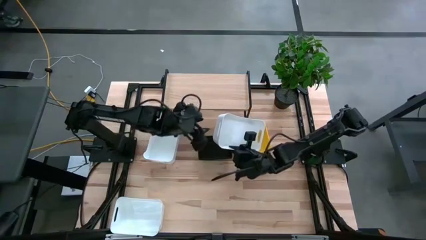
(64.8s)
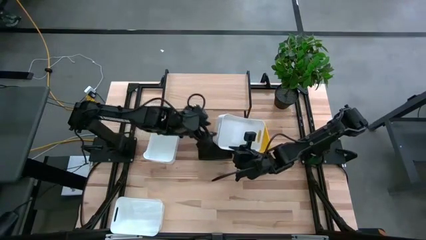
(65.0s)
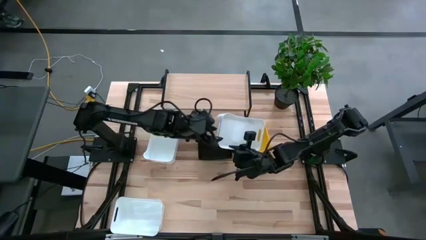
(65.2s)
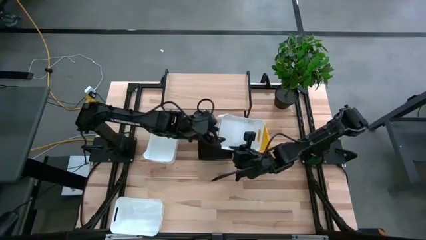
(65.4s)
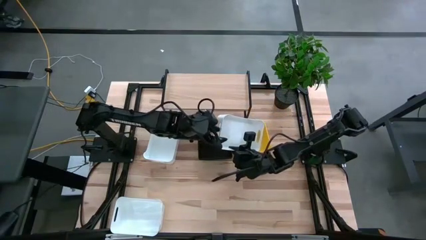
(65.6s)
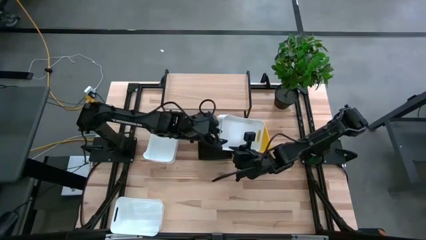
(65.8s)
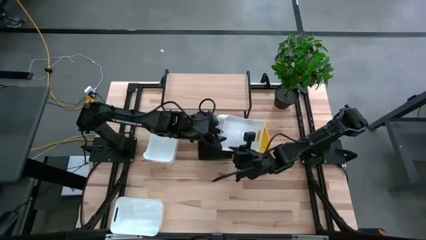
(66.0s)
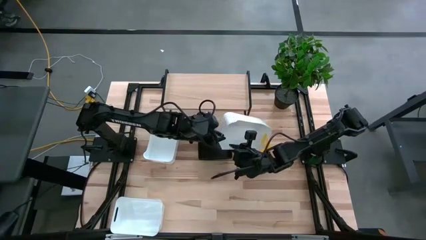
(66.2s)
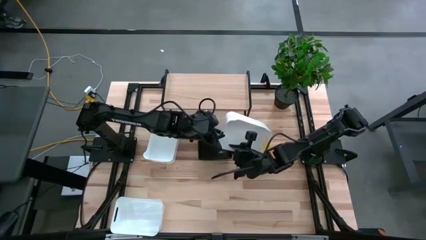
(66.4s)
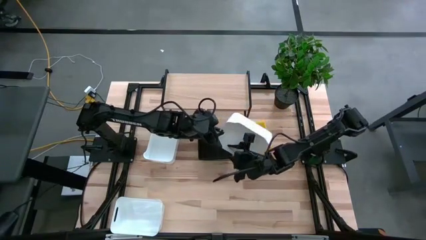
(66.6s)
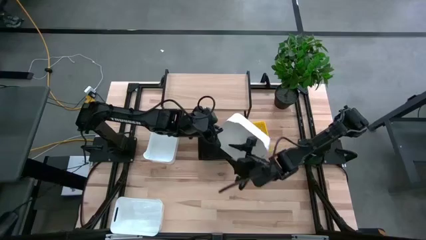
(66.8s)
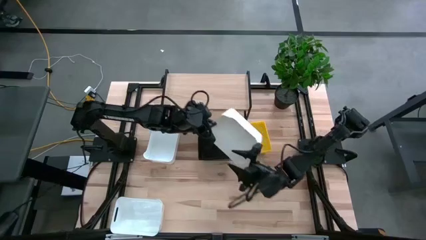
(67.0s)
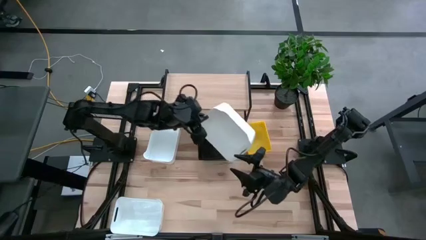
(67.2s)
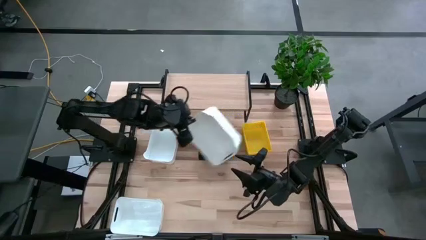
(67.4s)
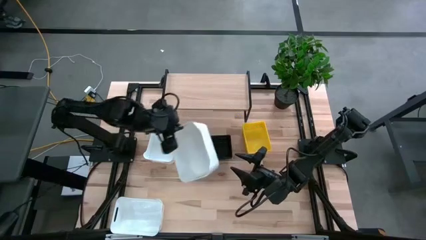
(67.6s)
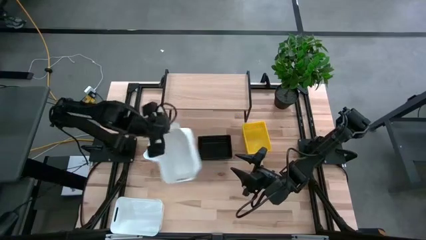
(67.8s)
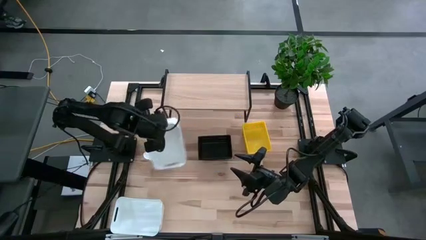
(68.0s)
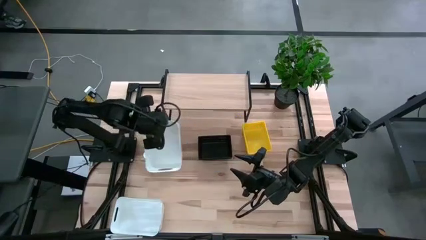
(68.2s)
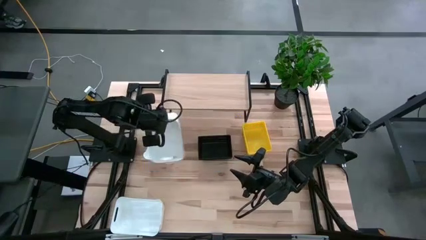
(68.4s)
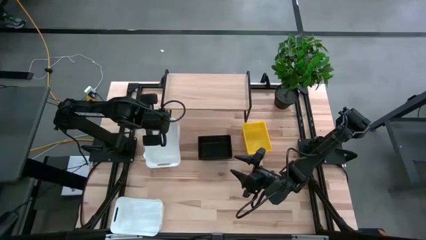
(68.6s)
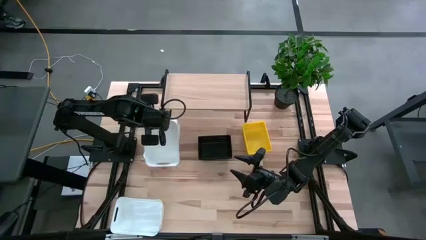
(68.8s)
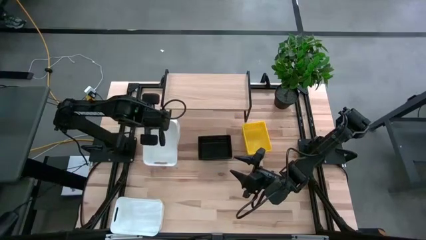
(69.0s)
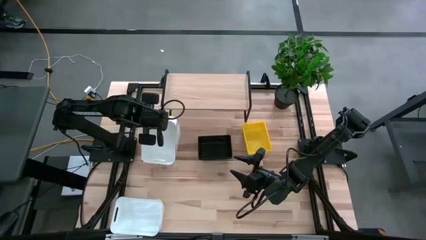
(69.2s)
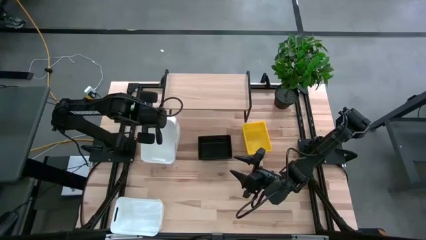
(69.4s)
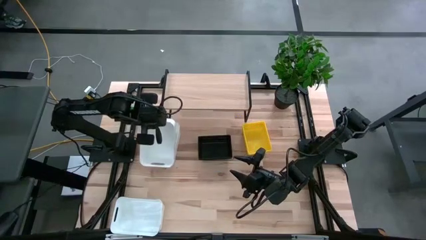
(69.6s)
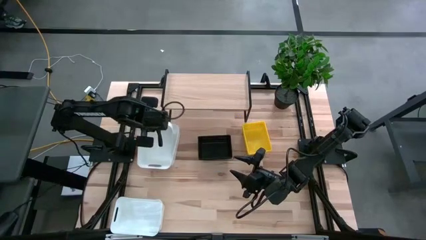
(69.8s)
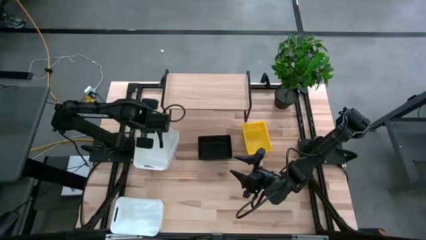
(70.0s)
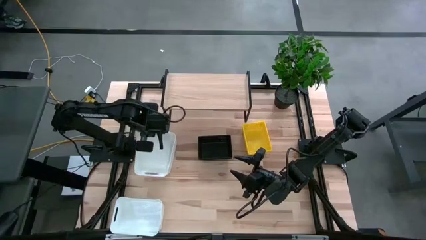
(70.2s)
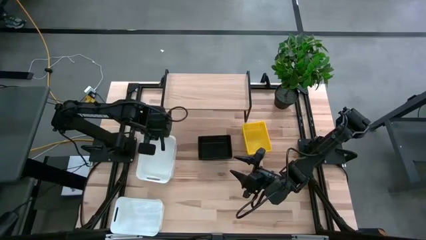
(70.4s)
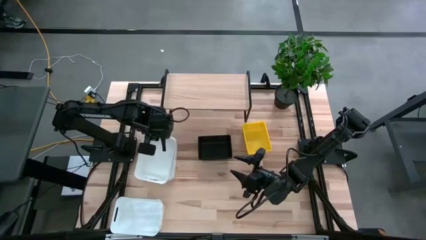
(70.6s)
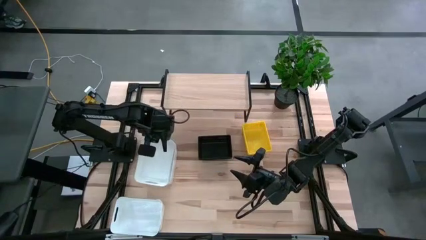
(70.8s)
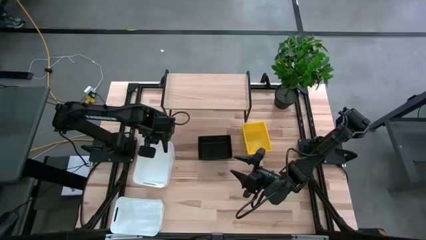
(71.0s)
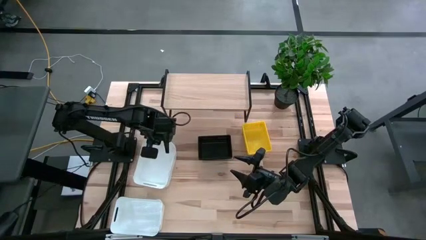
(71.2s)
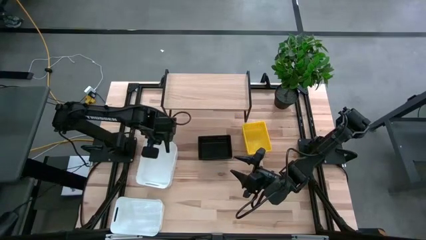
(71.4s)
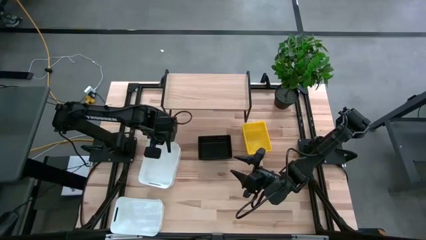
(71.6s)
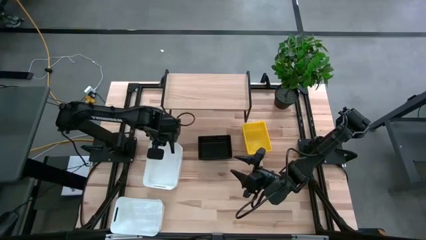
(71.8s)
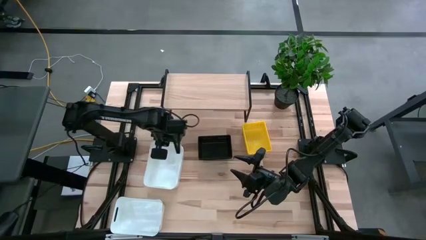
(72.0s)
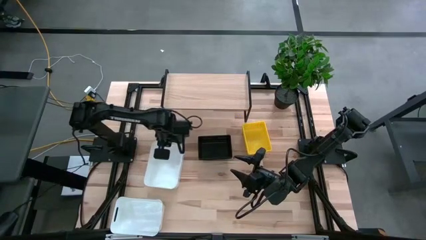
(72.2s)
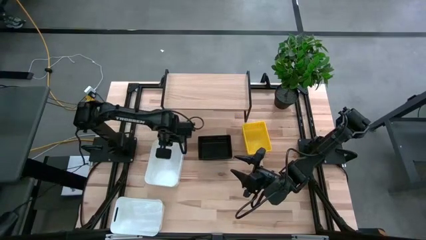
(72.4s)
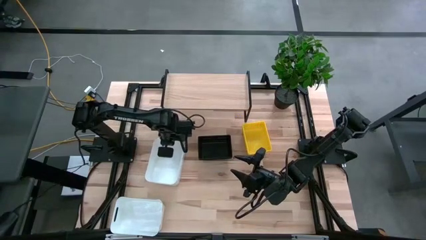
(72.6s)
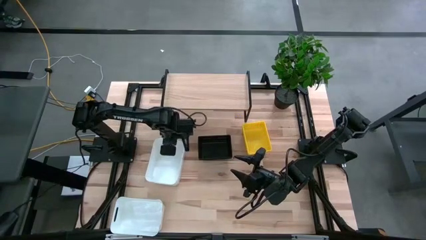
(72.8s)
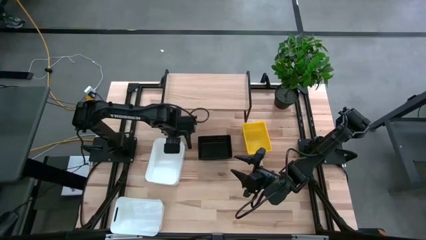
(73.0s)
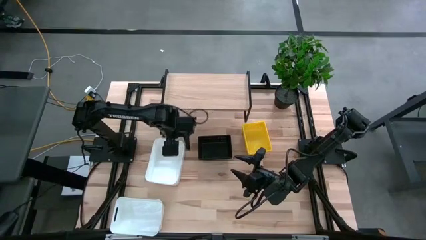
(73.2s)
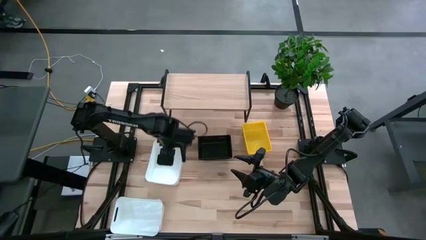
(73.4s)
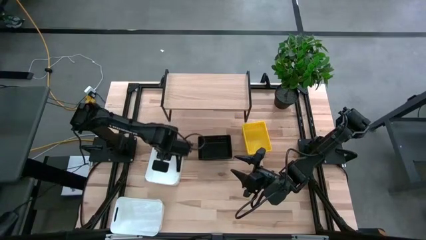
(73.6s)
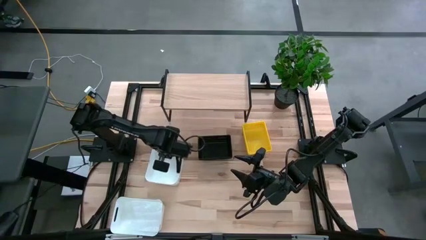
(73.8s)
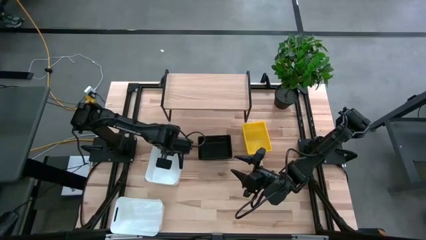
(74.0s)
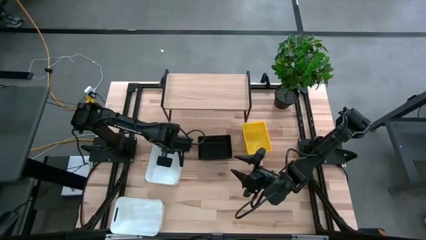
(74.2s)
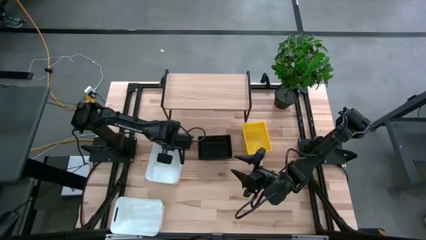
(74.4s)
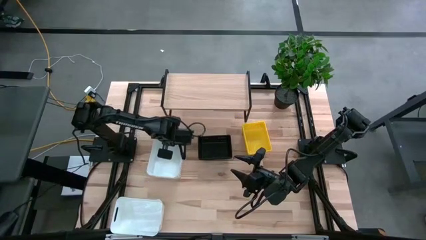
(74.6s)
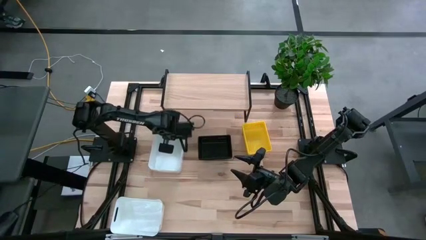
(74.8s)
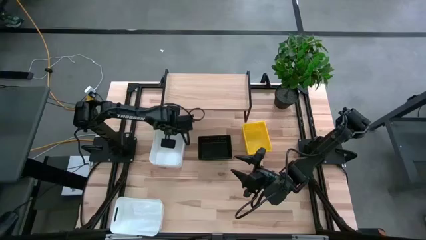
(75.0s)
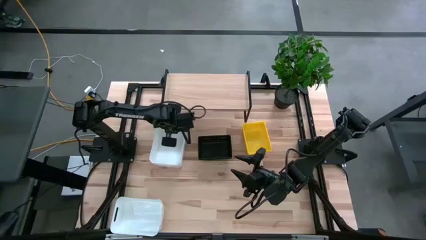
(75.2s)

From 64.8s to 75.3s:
Task: Stack baskets on shelf by color
Stack the top right white bin on the top left white bin

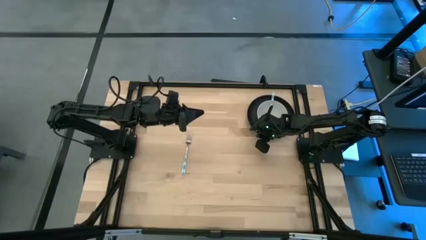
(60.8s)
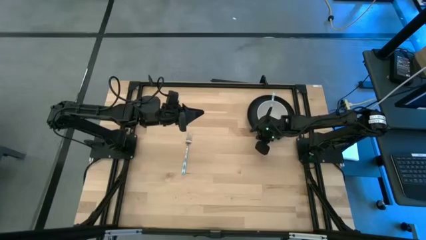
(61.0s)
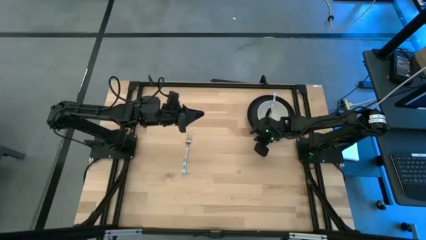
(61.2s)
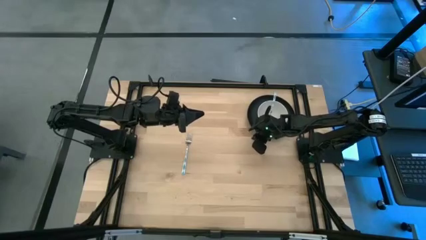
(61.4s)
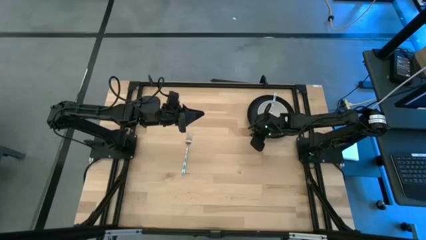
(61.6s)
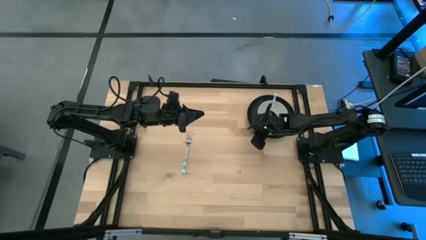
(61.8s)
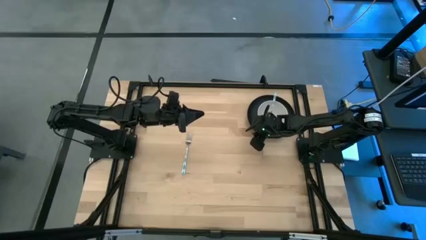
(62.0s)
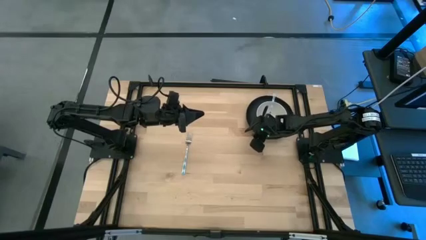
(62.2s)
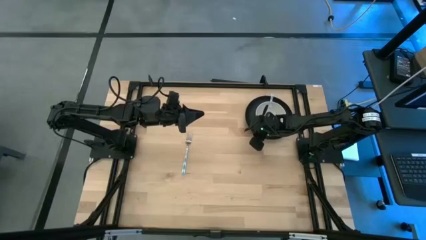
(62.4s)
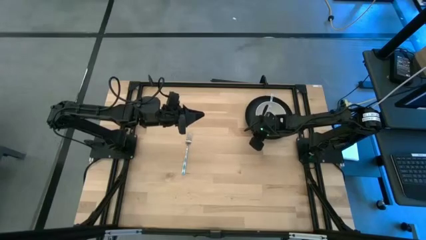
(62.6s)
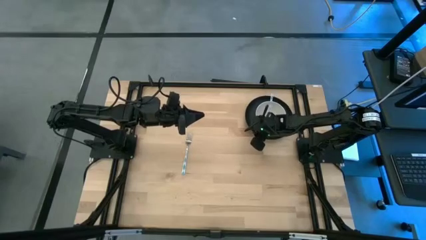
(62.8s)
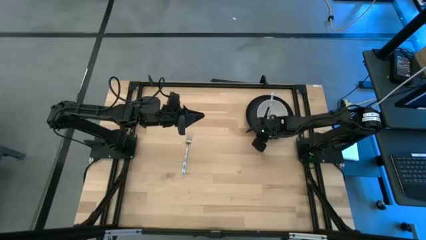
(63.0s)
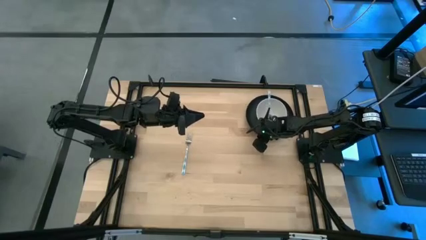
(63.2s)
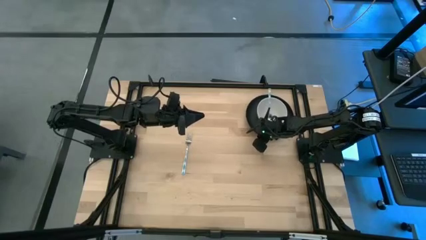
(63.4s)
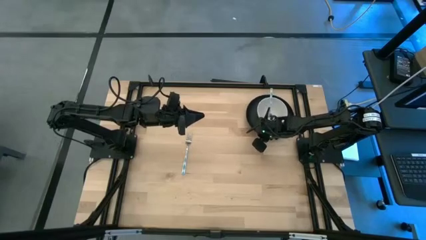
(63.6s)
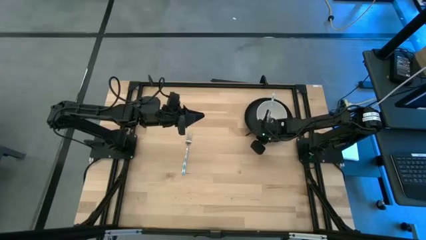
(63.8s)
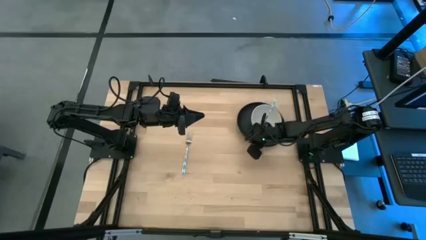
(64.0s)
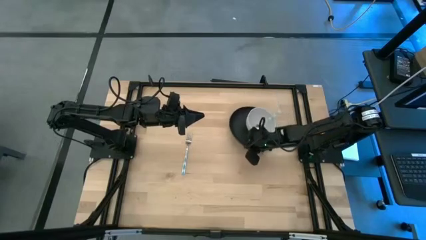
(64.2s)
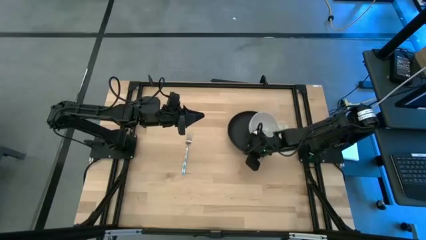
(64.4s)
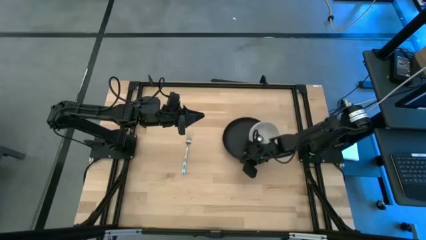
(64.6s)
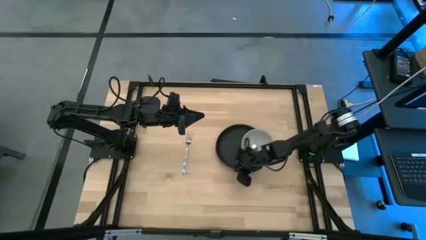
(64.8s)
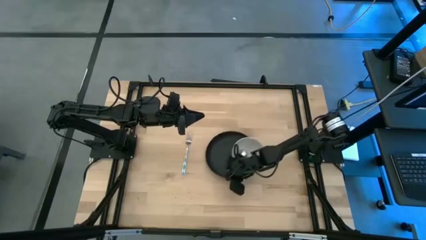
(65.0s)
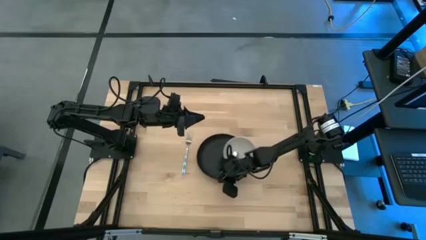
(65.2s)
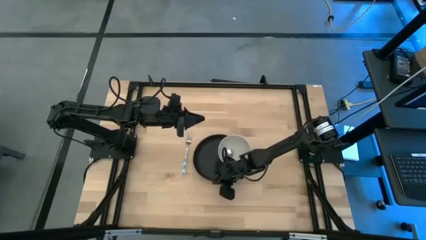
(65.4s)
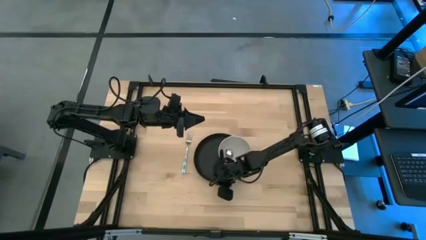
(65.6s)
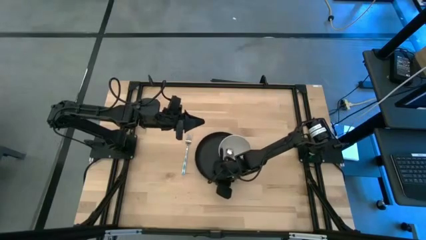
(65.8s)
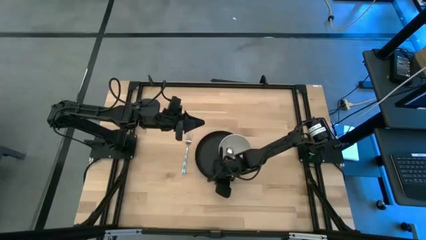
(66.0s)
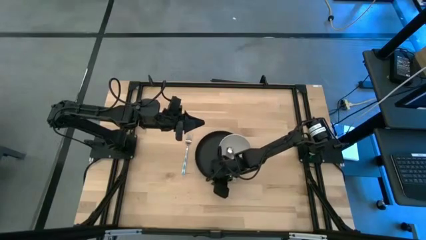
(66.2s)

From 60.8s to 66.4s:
Task: Set table place
Move the black plate to the center
